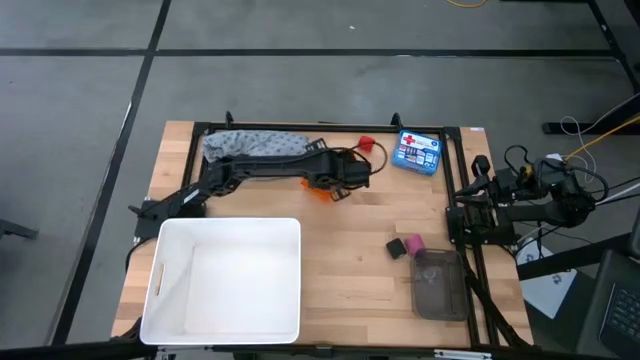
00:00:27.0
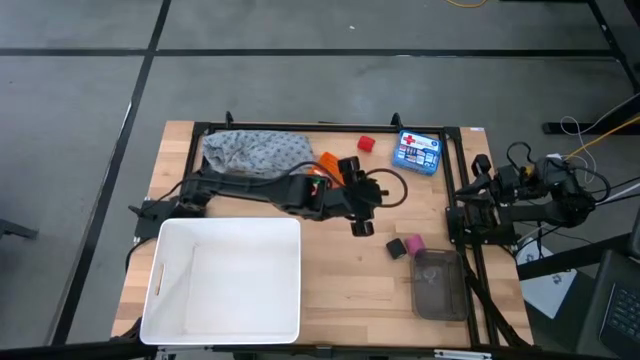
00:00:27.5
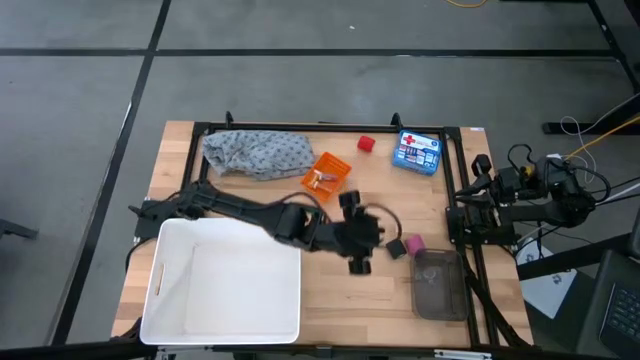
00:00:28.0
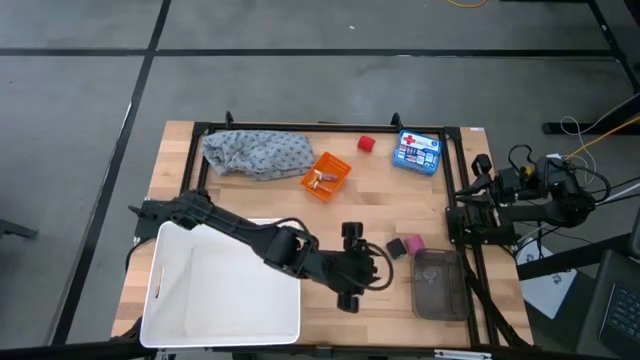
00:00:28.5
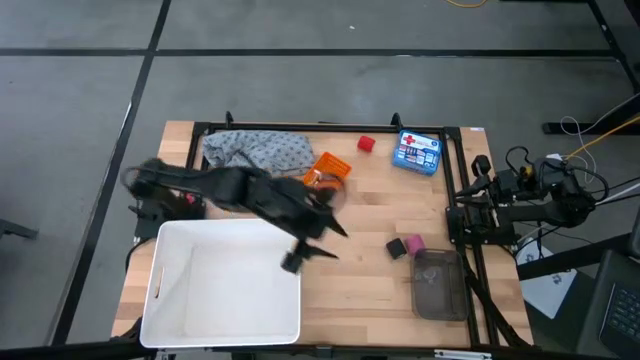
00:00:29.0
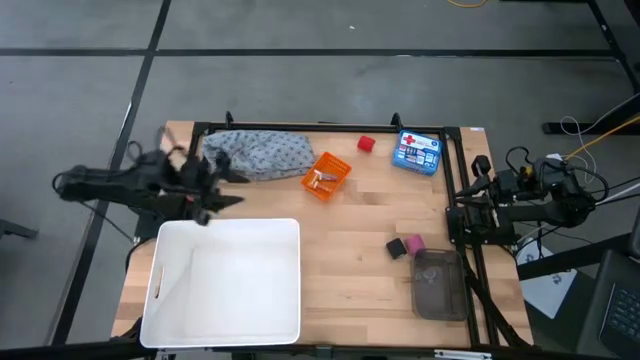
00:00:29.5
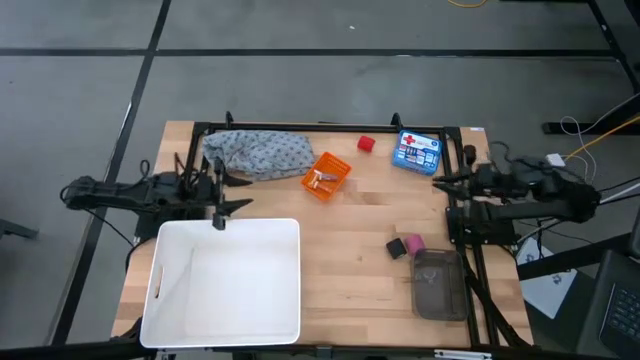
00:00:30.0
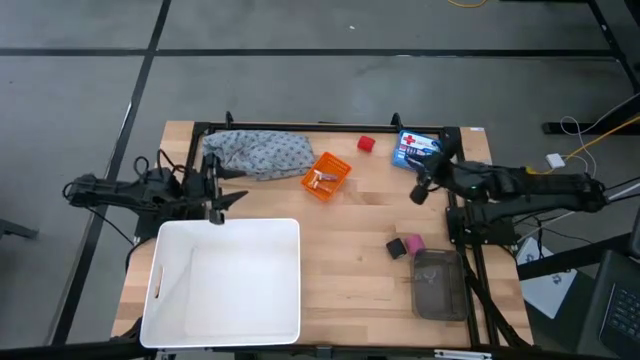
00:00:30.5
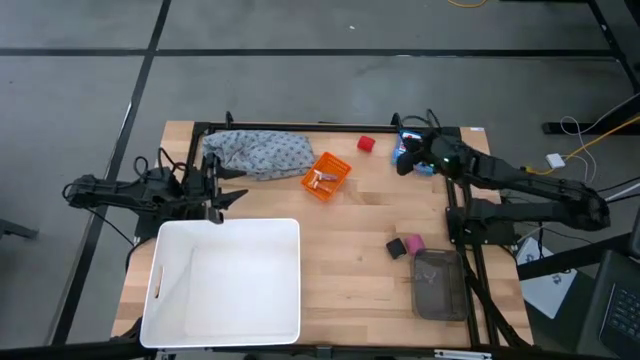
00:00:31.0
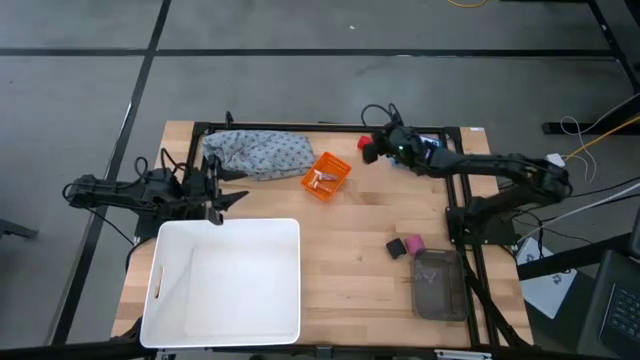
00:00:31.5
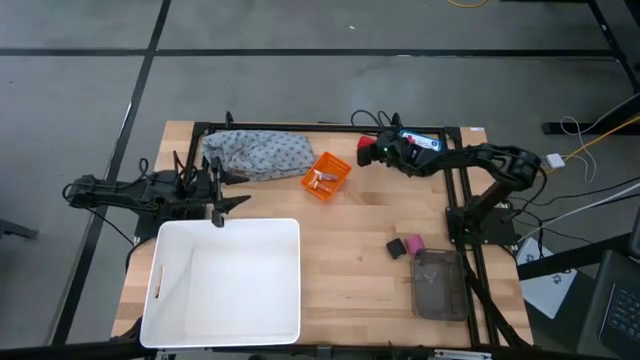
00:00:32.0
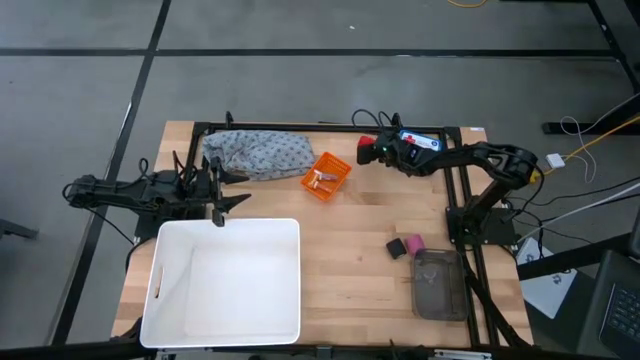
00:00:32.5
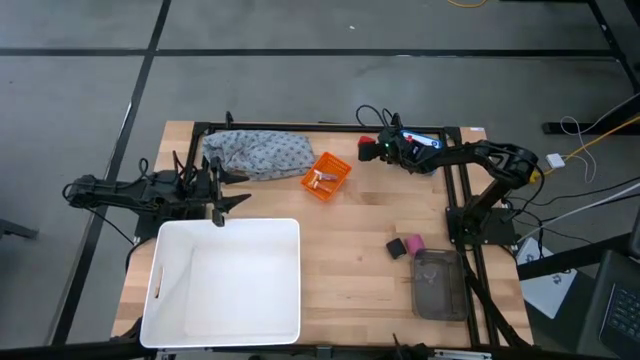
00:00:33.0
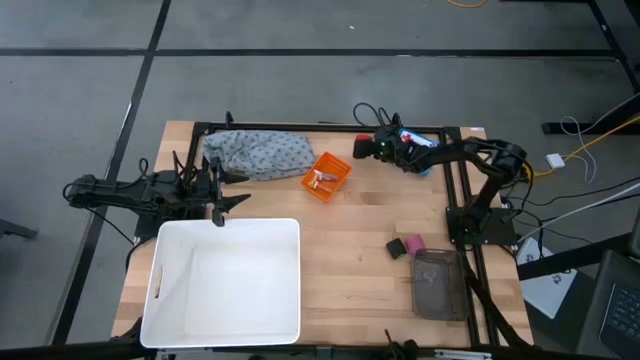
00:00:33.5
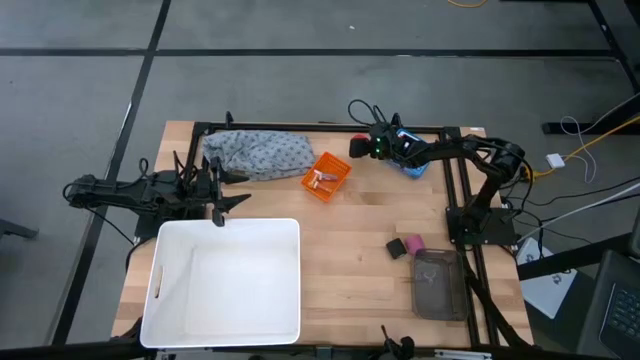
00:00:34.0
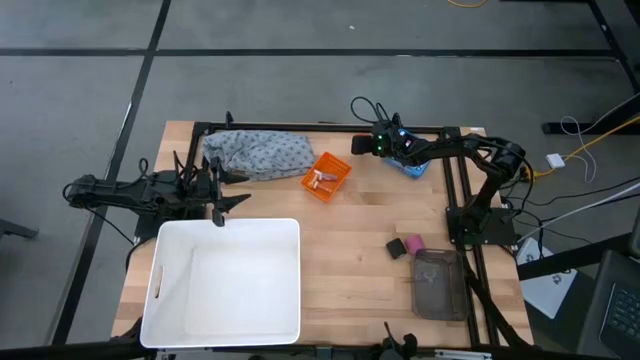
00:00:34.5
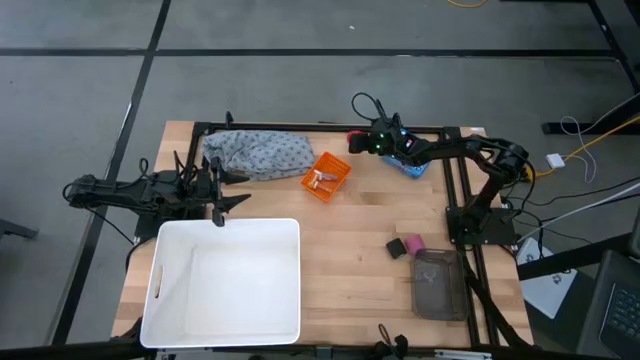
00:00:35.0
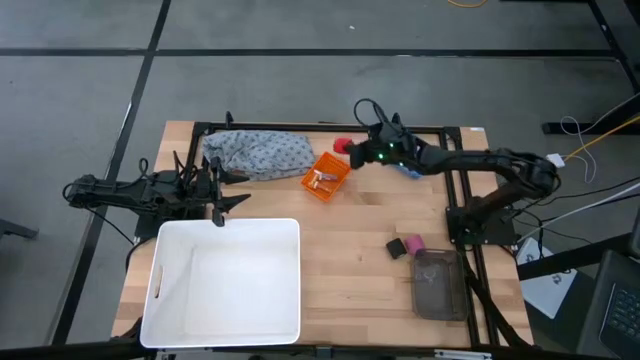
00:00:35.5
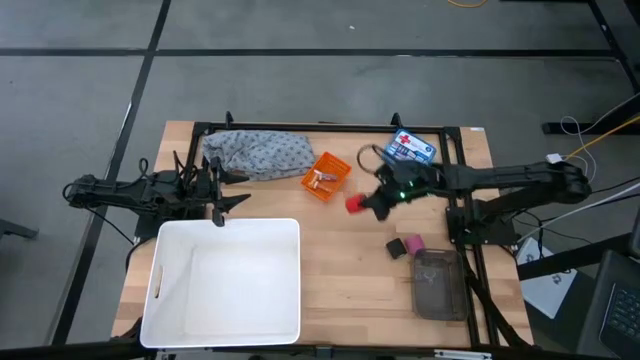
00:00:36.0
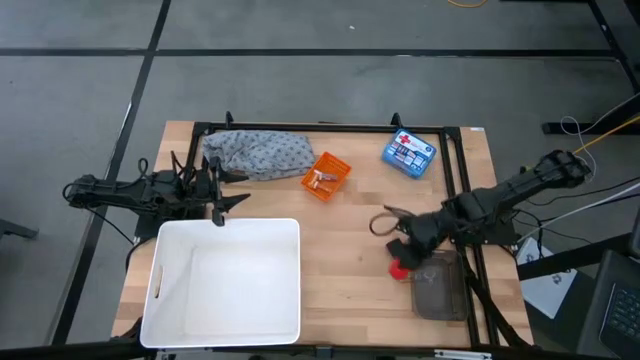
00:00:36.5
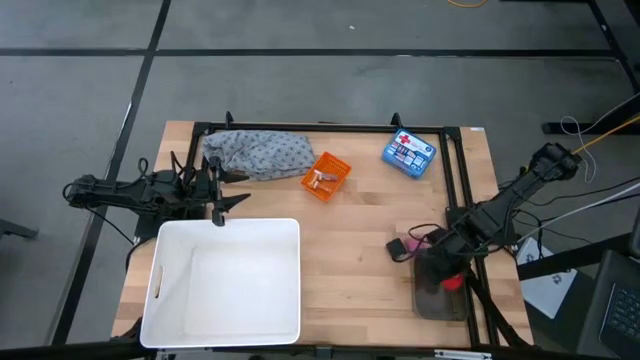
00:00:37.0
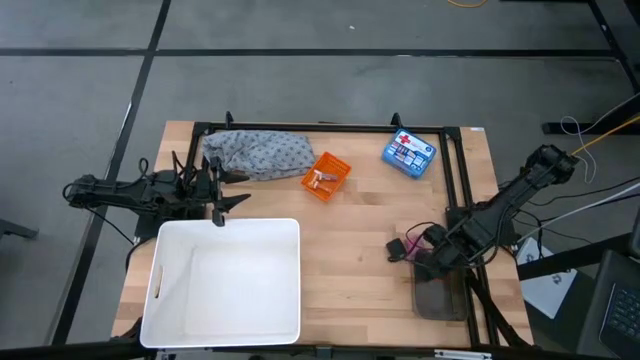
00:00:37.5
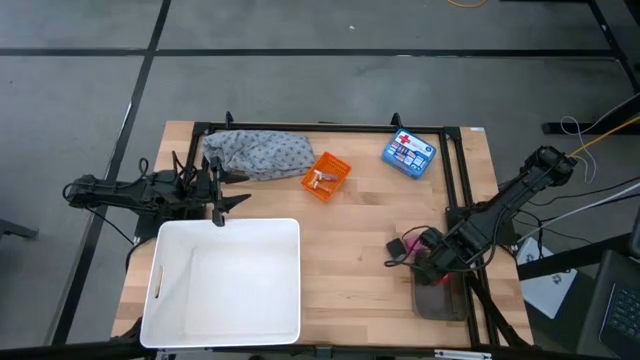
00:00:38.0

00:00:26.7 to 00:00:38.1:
Task: Pick & place medical supplies in basket/bin
Put the red bandage into the transparent black bin

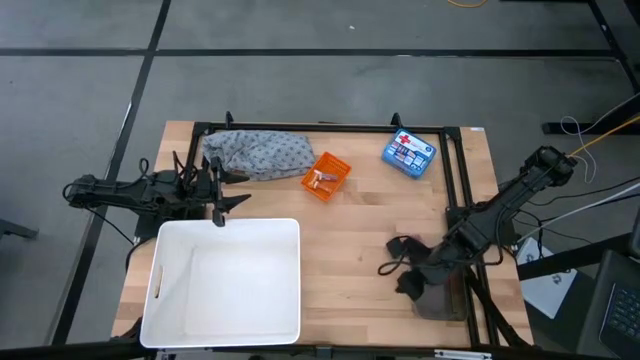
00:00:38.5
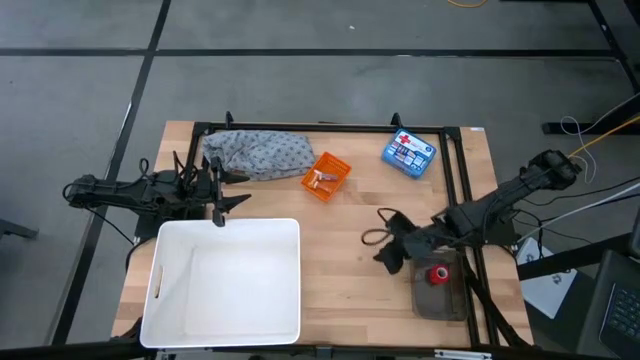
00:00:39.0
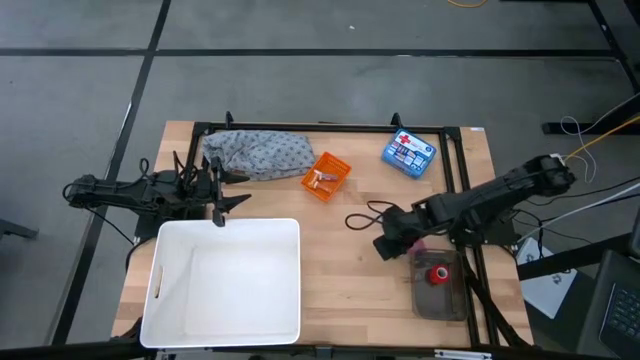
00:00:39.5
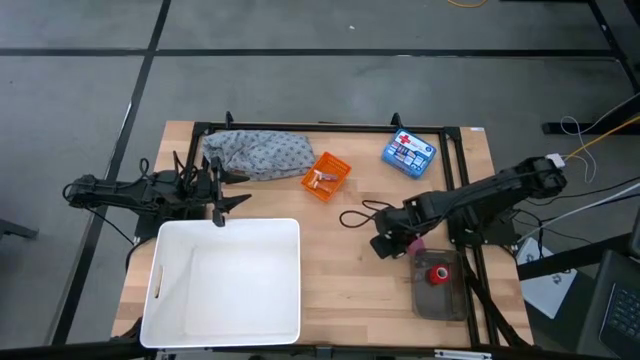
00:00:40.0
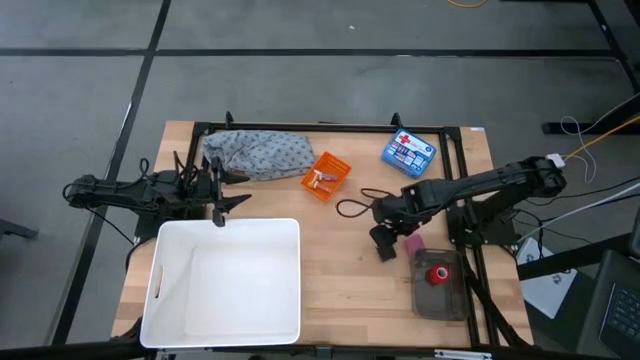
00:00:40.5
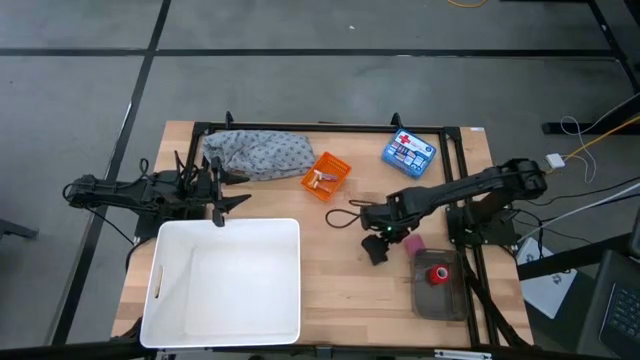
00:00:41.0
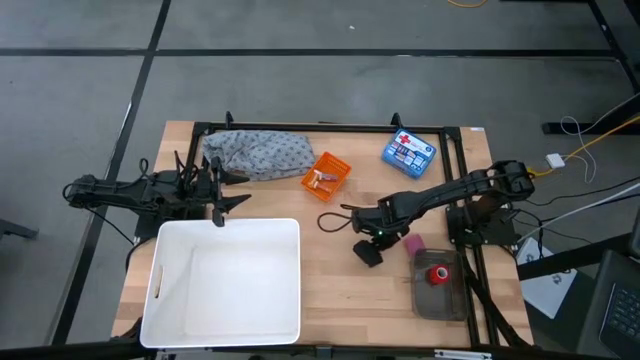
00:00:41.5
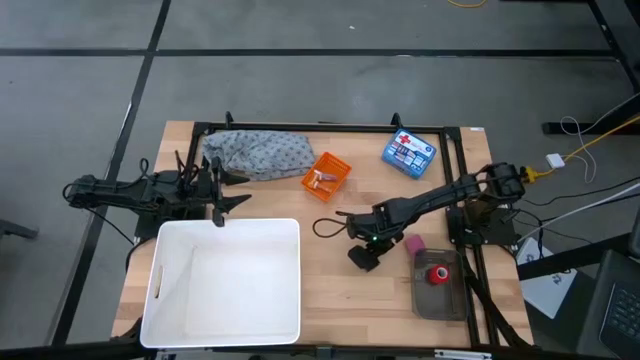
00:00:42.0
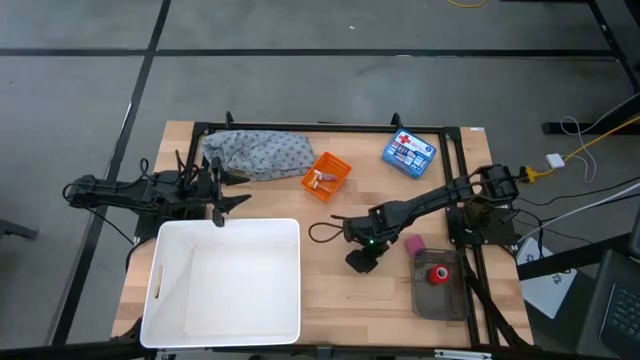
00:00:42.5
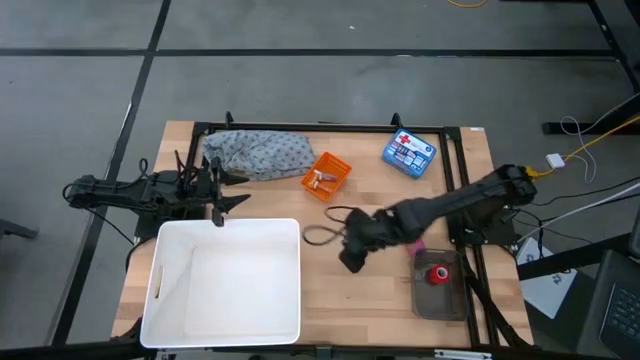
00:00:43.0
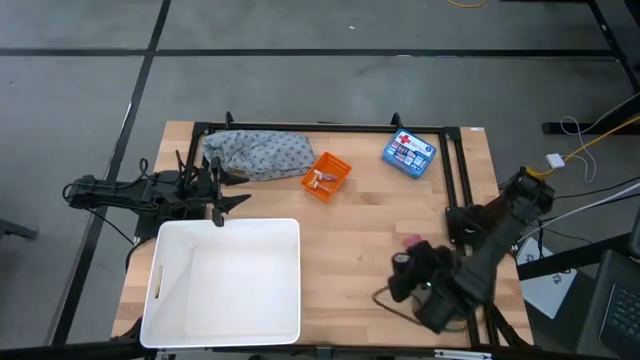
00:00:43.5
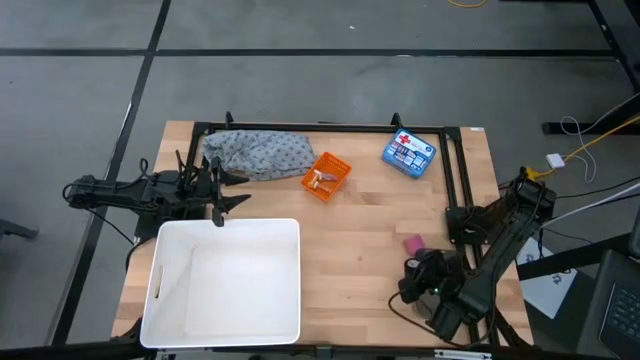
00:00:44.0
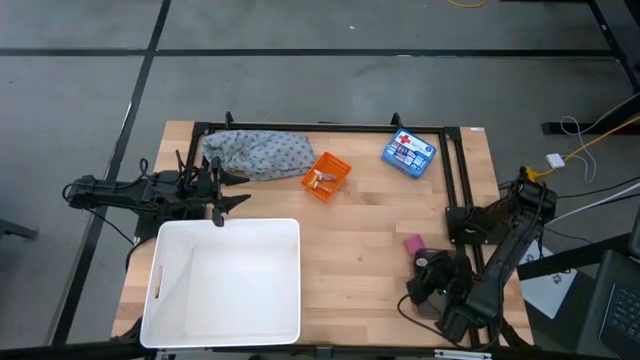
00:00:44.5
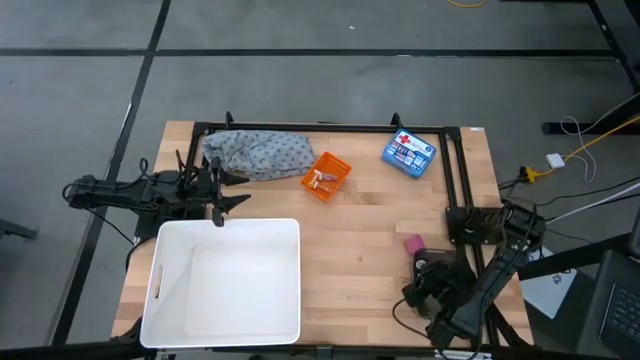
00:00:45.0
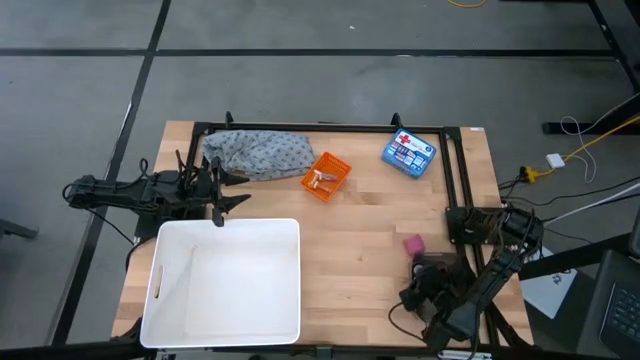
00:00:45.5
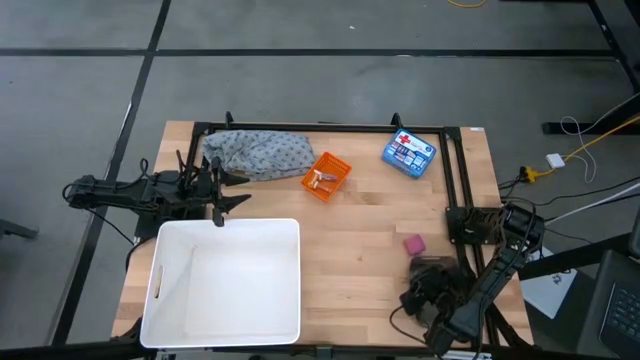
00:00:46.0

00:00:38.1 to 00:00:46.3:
Put the black bandage into the transparent black bin

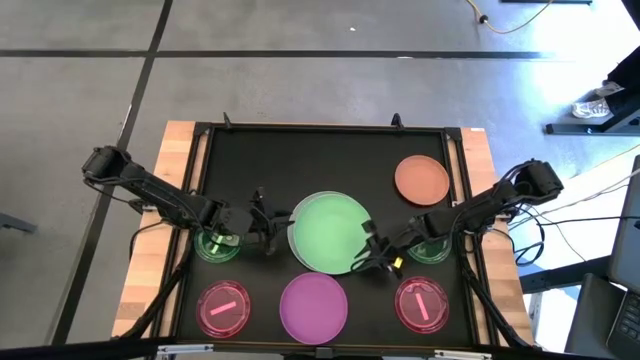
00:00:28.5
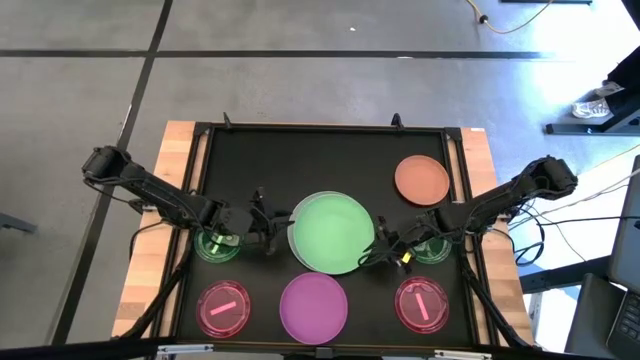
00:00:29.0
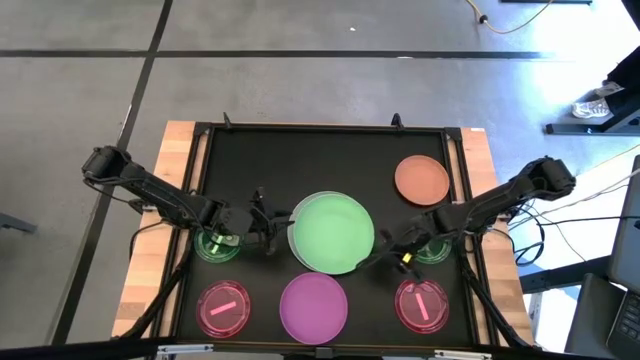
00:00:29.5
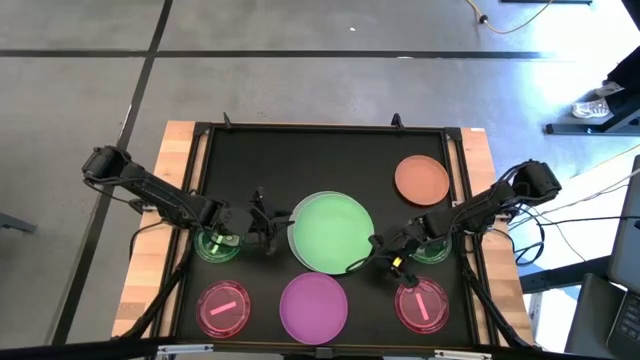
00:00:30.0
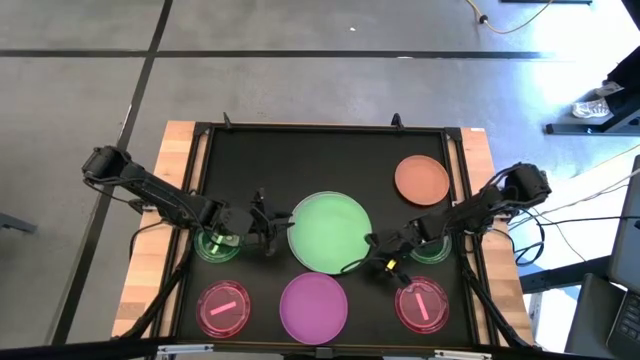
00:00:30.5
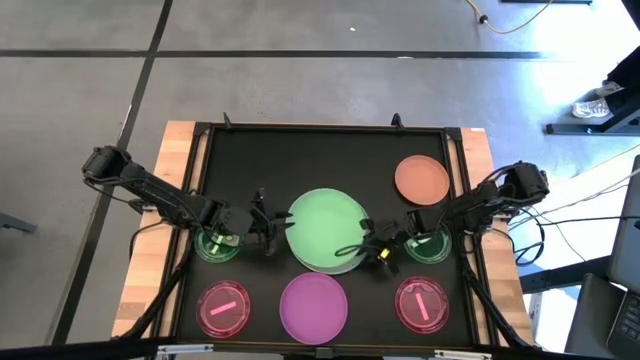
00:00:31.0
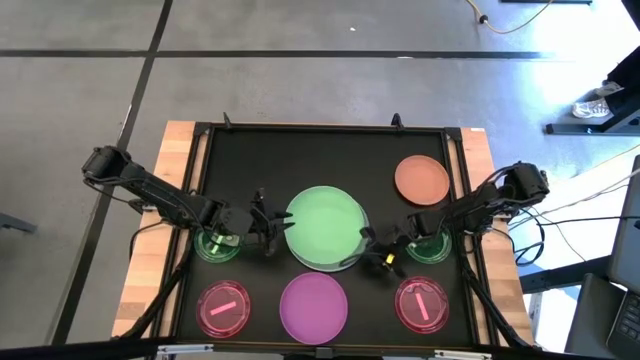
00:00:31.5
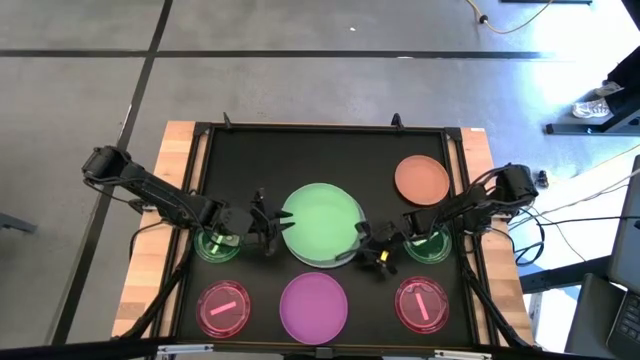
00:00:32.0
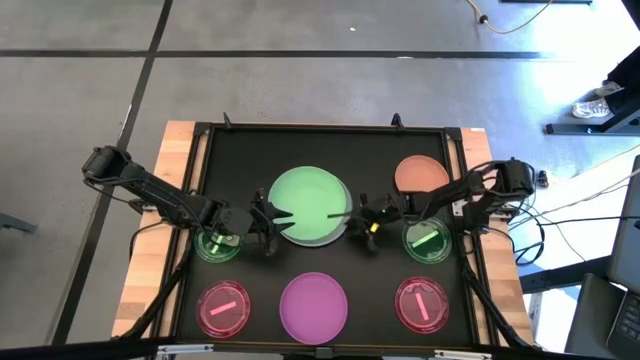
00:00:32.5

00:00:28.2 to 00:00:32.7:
Task: Stack plastic plates
Adjust the stacked plates
